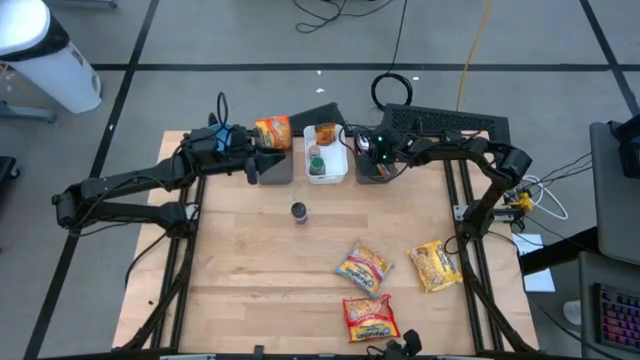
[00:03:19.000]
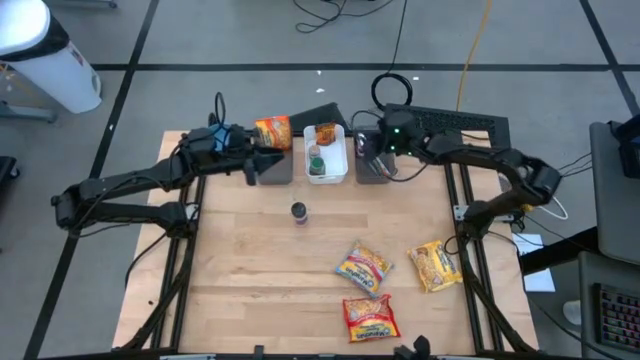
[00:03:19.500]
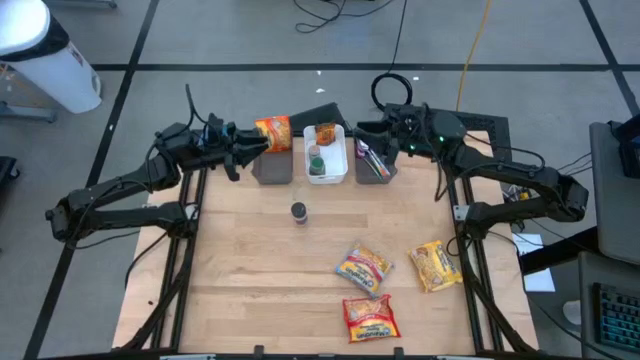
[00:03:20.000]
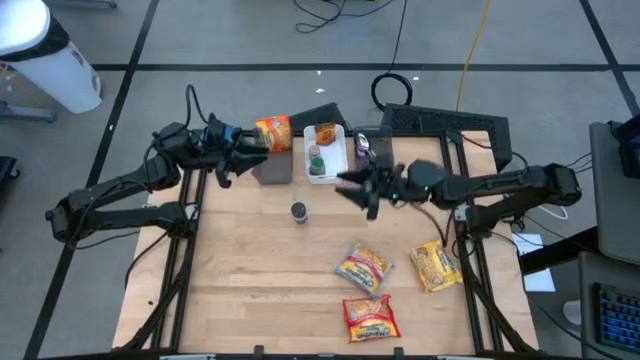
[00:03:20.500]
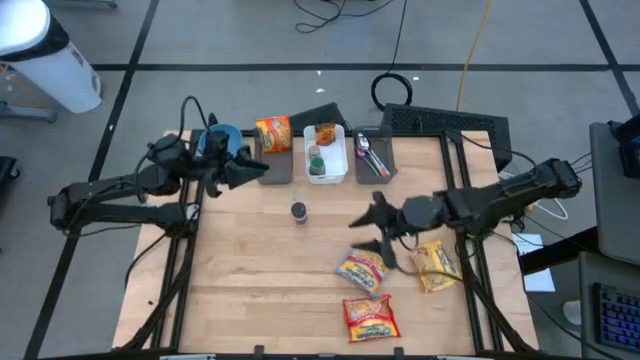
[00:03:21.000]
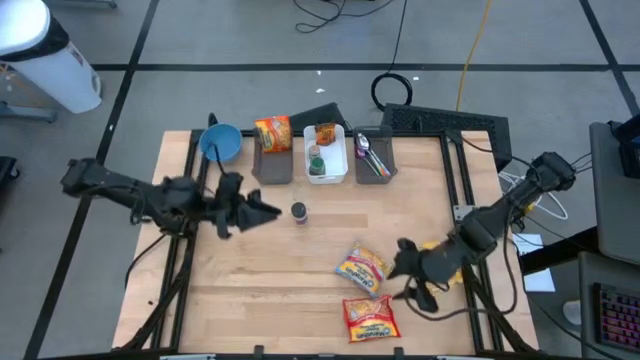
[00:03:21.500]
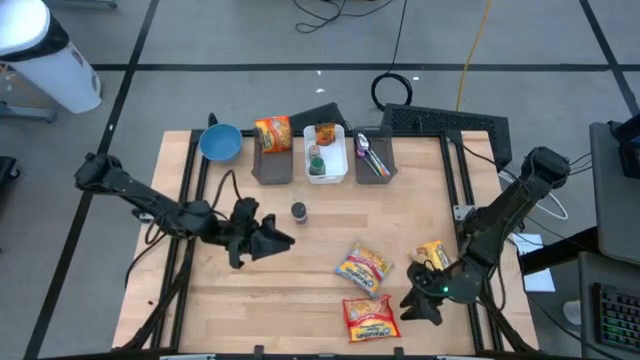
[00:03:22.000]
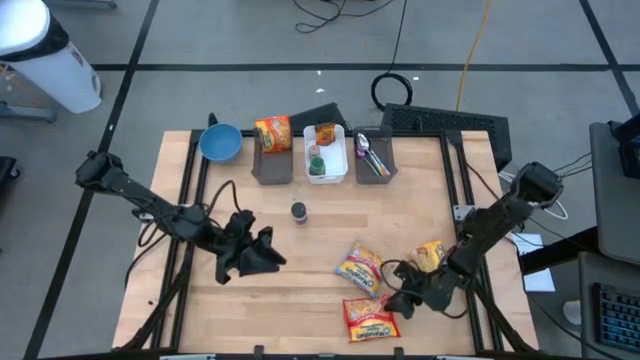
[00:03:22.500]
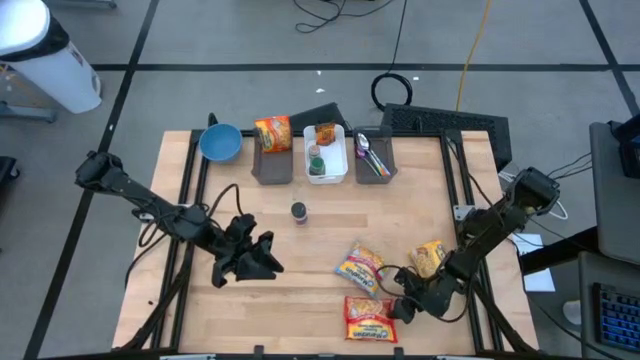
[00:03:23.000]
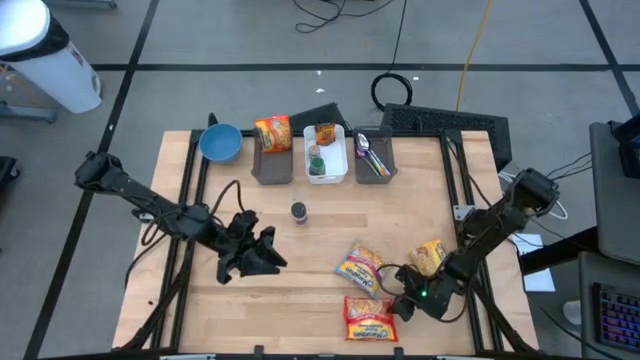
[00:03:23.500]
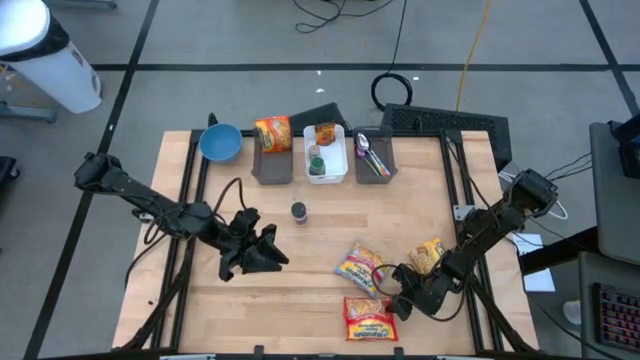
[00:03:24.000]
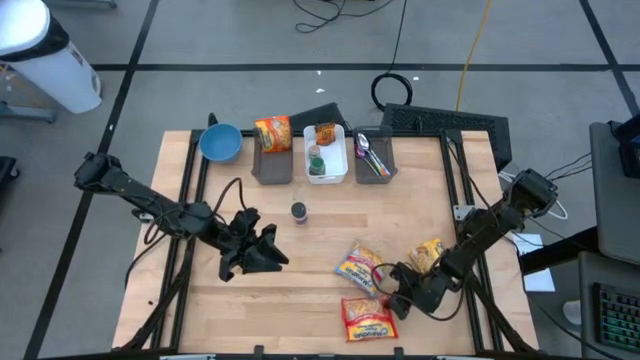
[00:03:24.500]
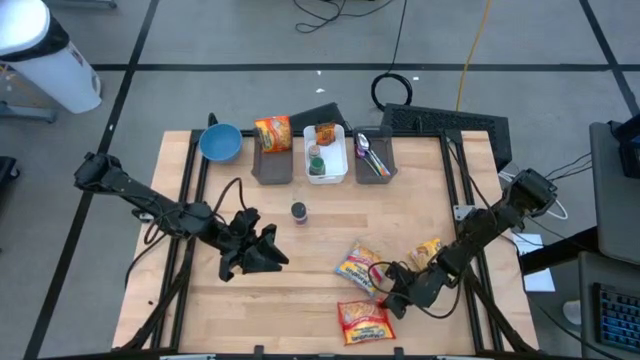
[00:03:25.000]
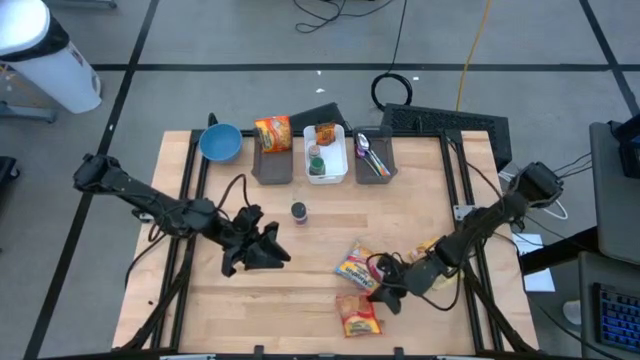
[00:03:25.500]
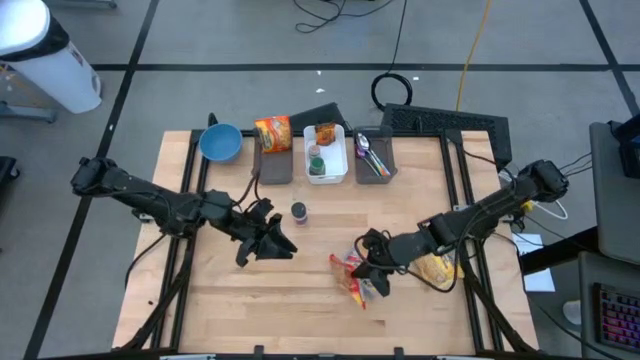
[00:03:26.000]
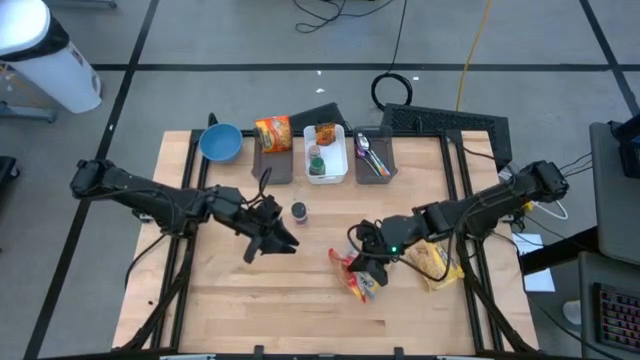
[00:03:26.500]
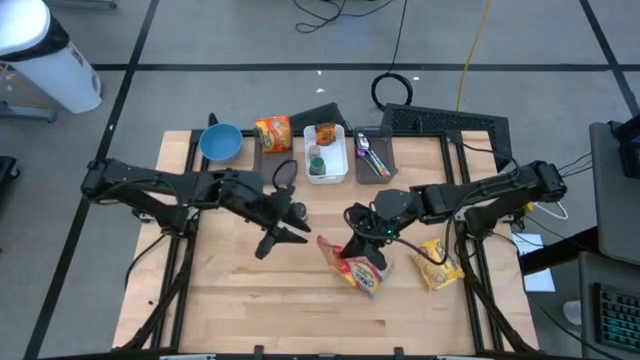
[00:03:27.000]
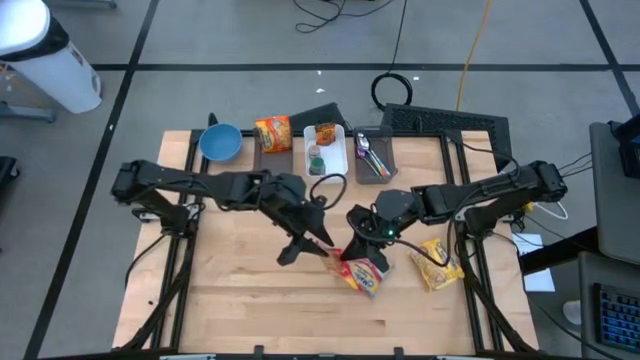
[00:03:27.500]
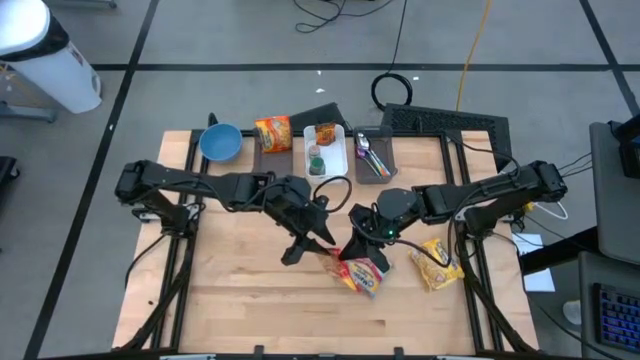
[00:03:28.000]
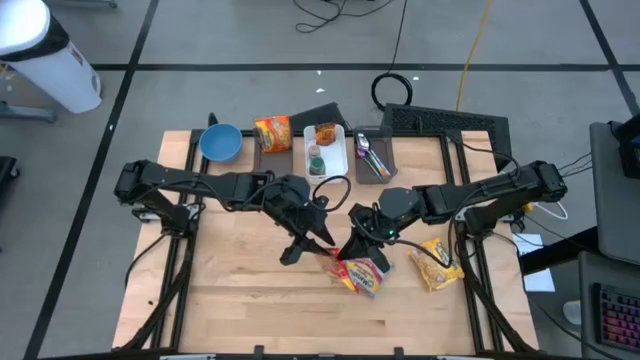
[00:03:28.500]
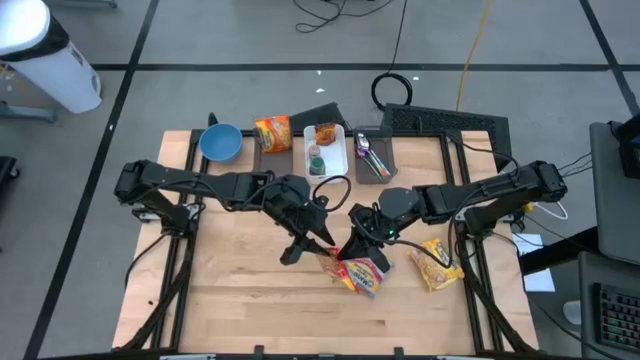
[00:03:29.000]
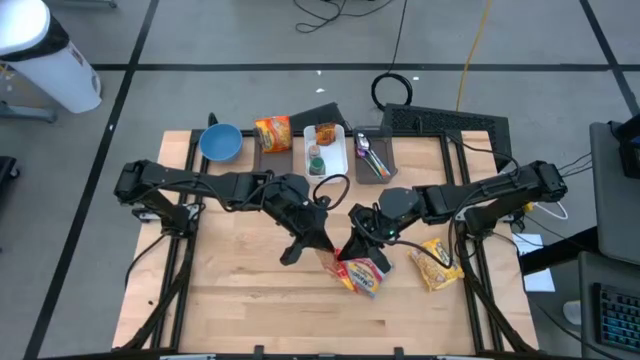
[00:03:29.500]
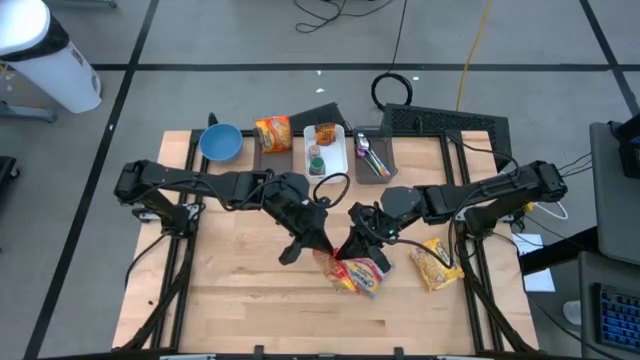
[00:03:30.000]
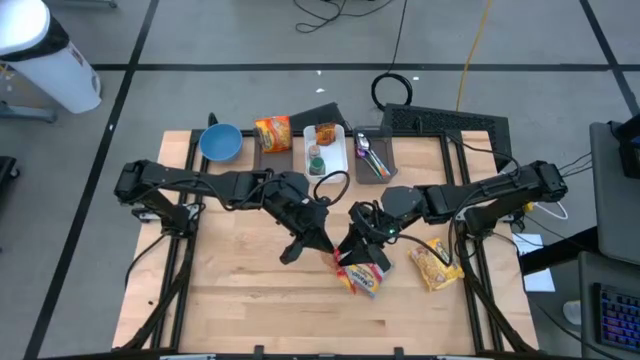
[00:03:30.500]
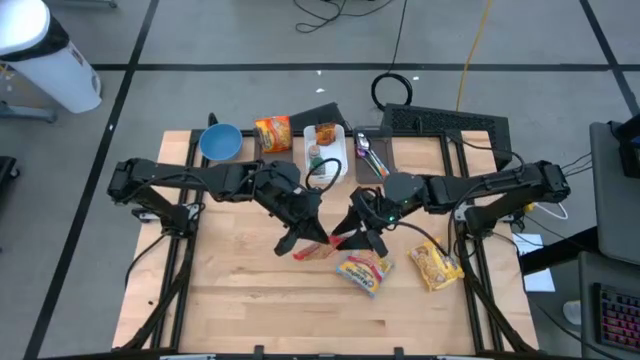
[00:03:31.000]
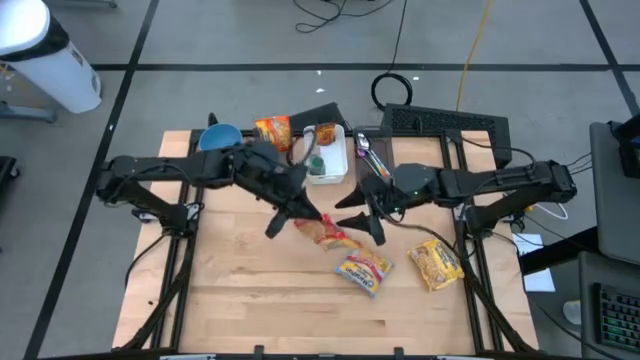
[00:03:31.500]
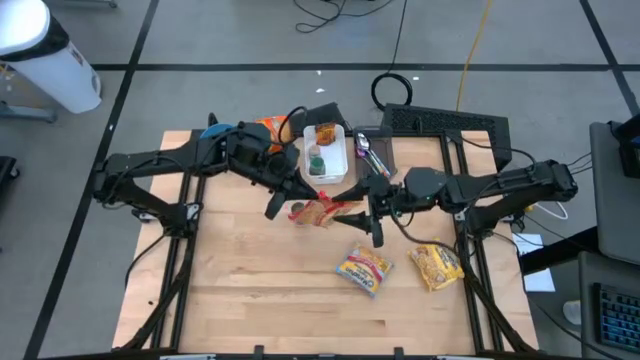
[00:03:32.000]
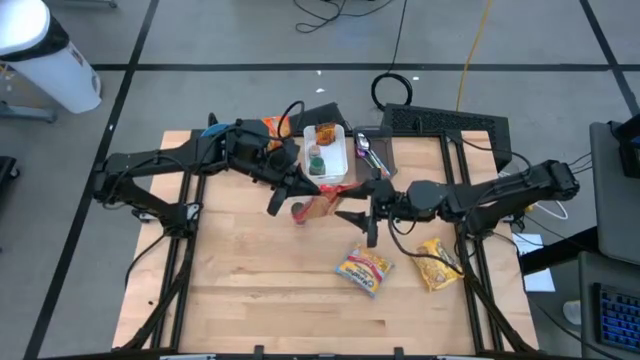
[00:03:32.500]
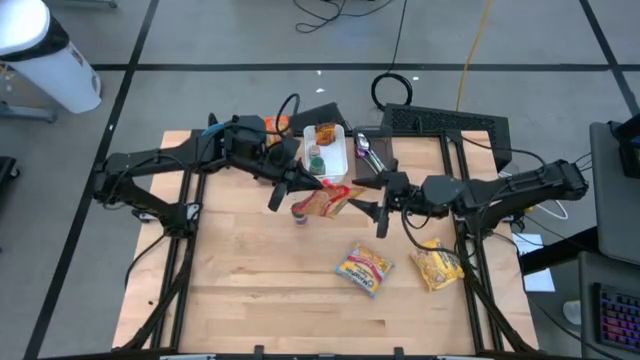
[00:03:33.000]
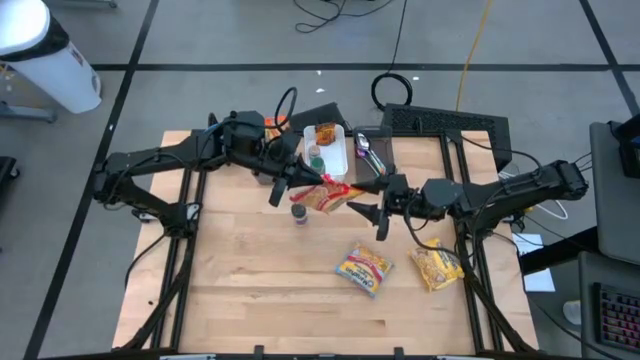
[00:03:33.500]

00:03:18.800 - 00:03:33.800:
Task: Pick & Place Food Item
Put the red noodle pack into the left black bin
